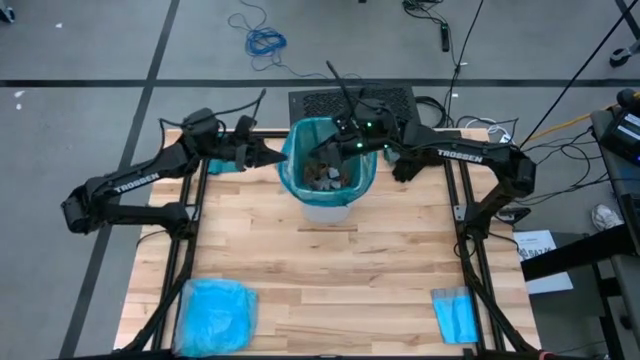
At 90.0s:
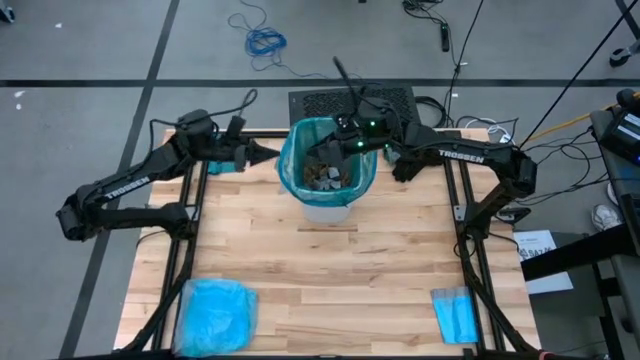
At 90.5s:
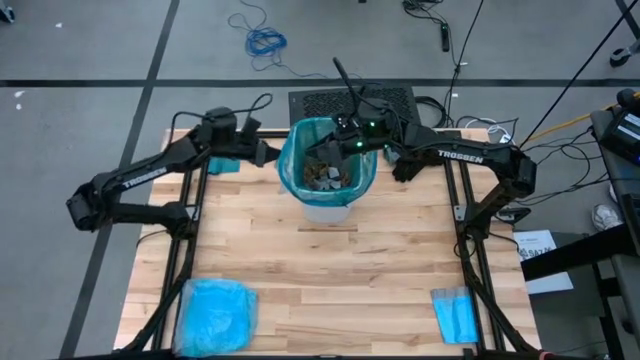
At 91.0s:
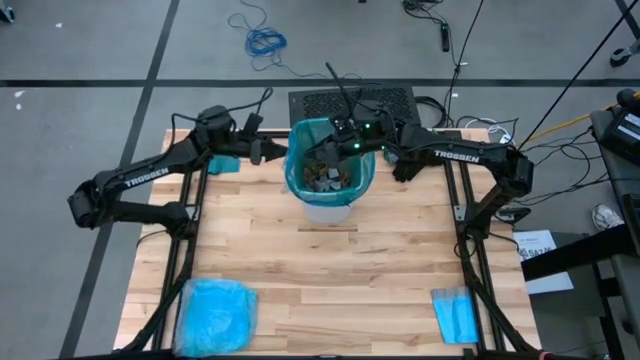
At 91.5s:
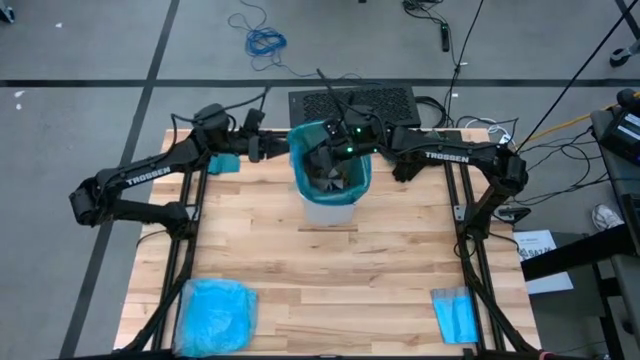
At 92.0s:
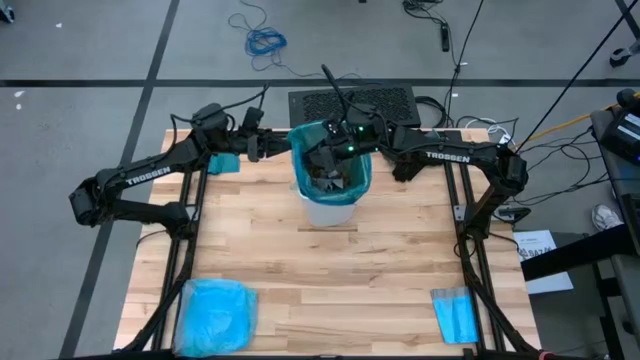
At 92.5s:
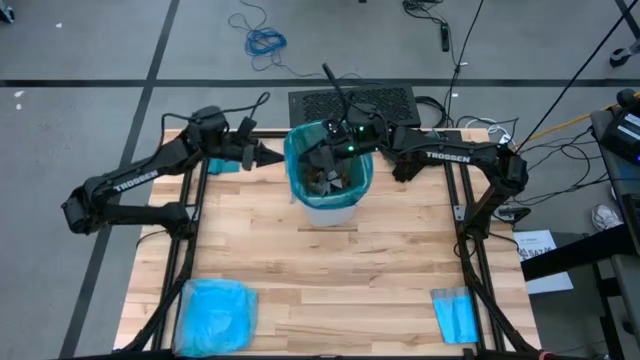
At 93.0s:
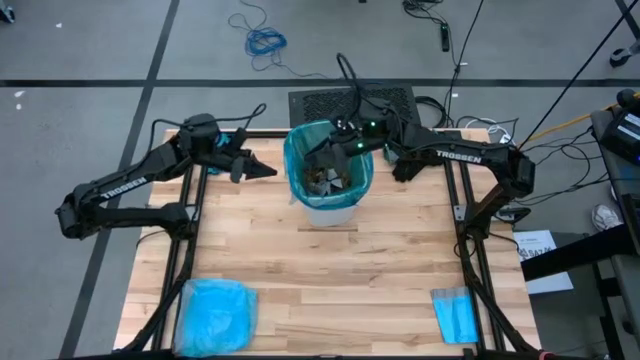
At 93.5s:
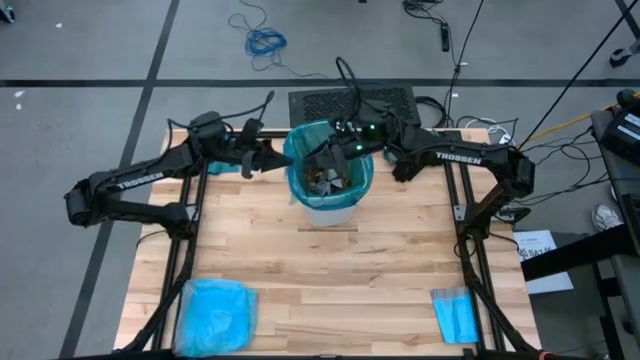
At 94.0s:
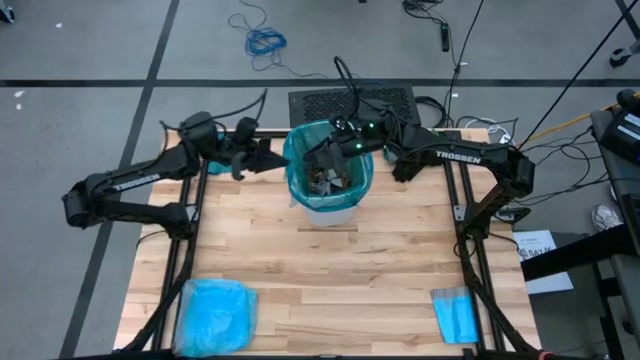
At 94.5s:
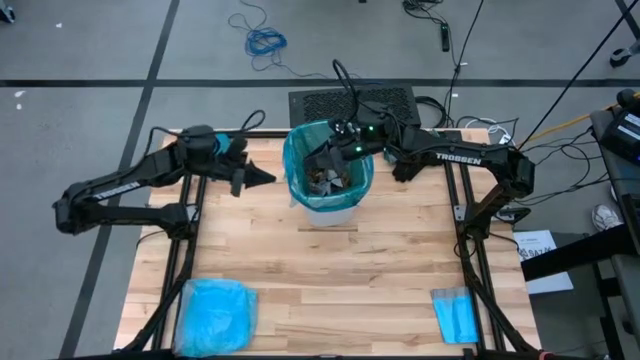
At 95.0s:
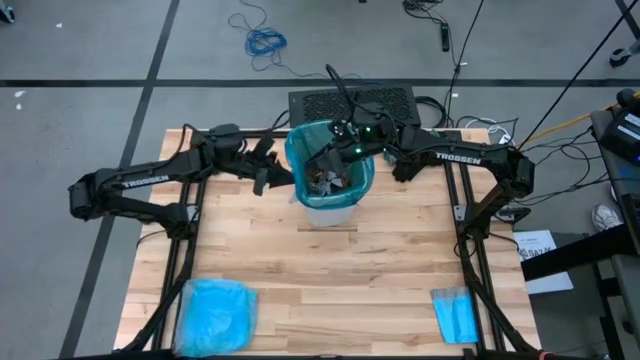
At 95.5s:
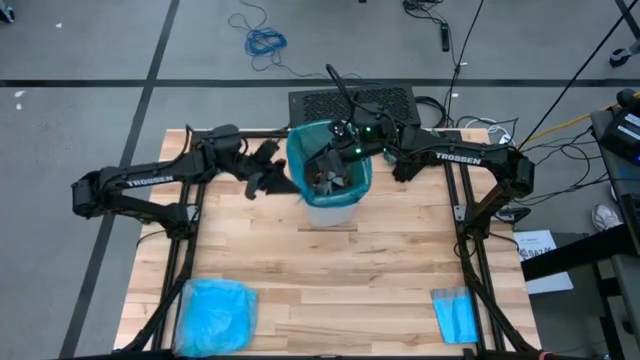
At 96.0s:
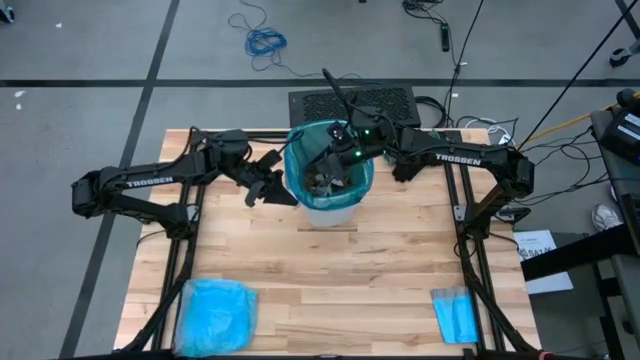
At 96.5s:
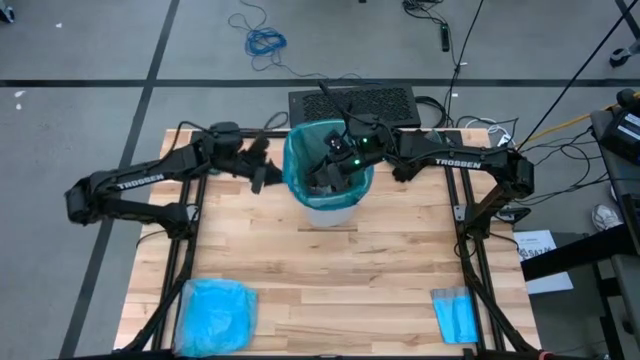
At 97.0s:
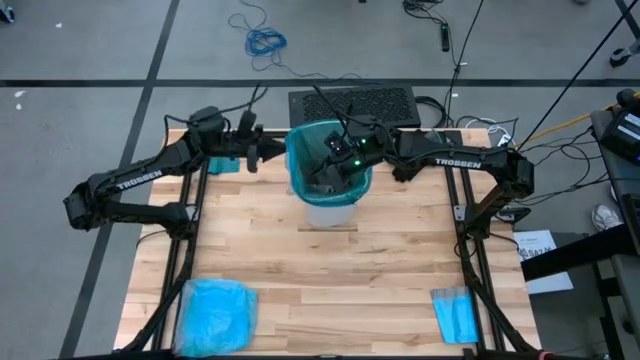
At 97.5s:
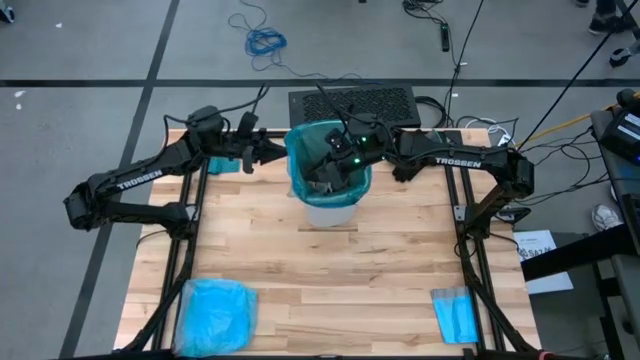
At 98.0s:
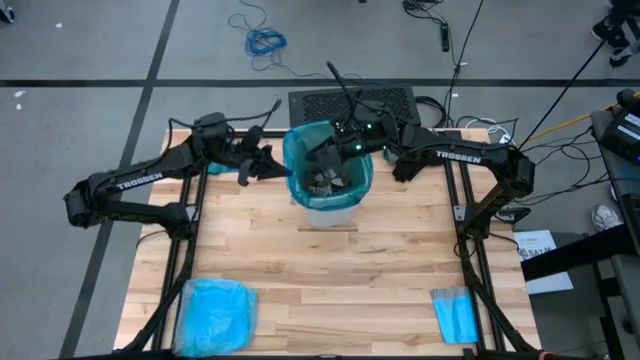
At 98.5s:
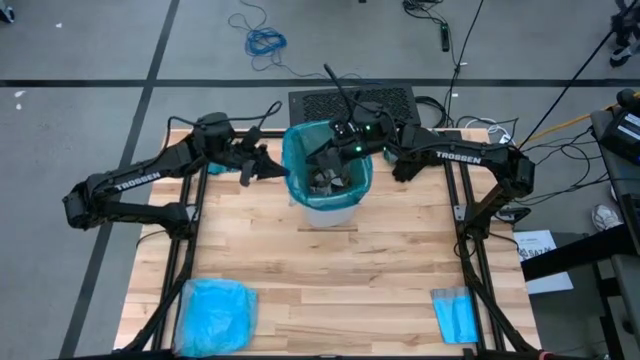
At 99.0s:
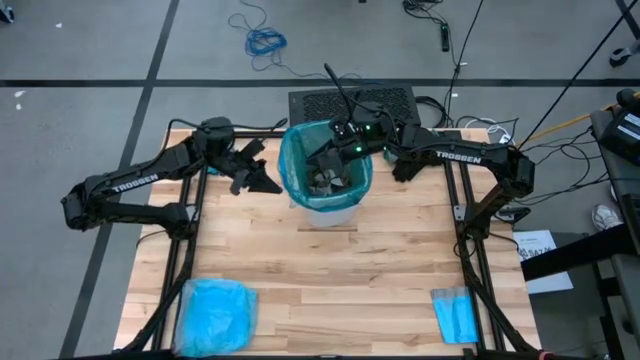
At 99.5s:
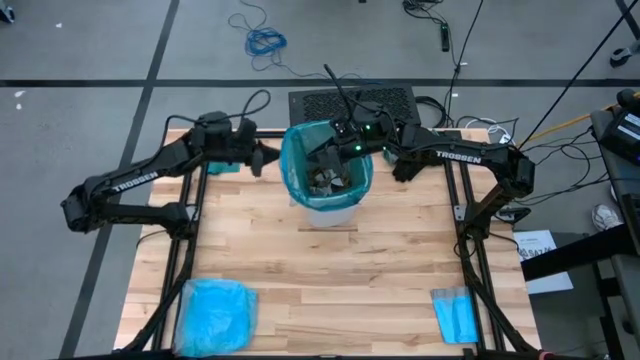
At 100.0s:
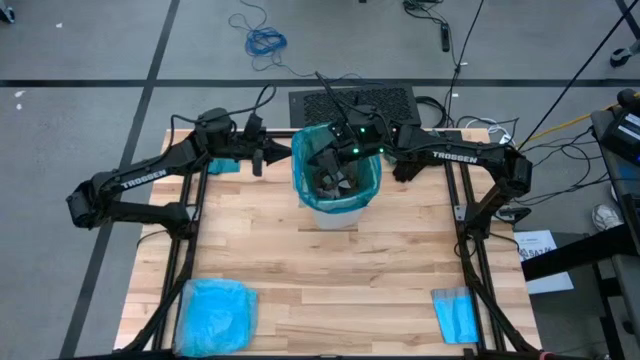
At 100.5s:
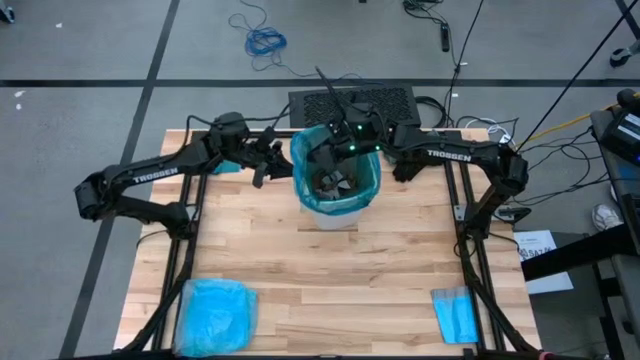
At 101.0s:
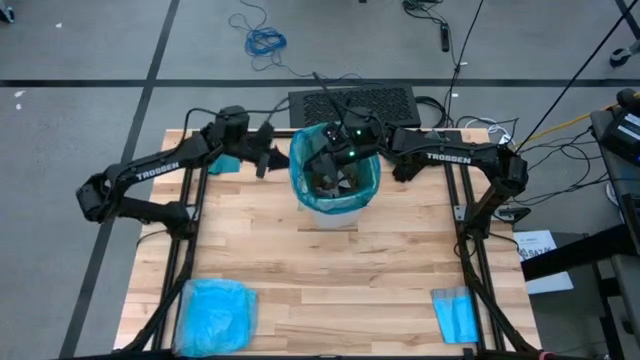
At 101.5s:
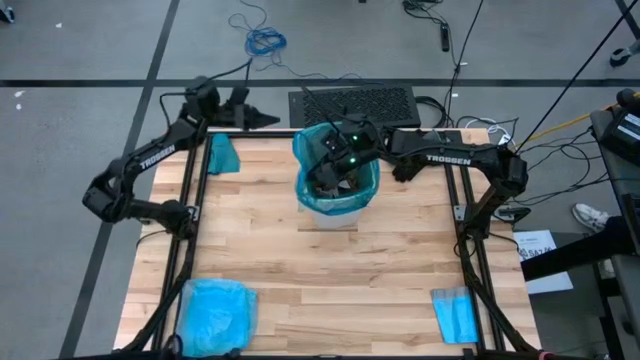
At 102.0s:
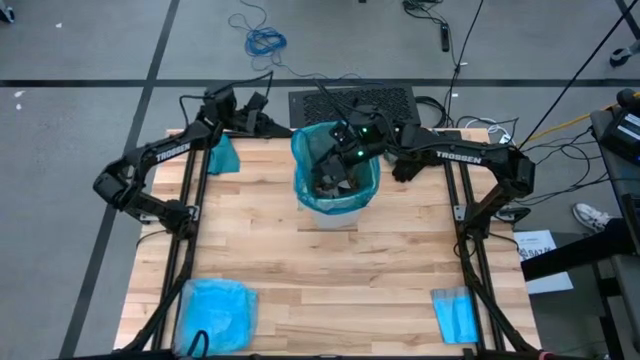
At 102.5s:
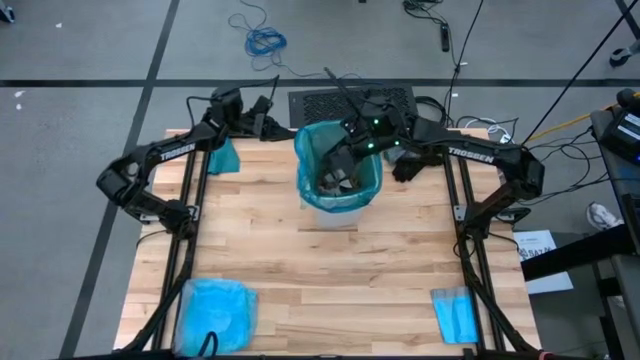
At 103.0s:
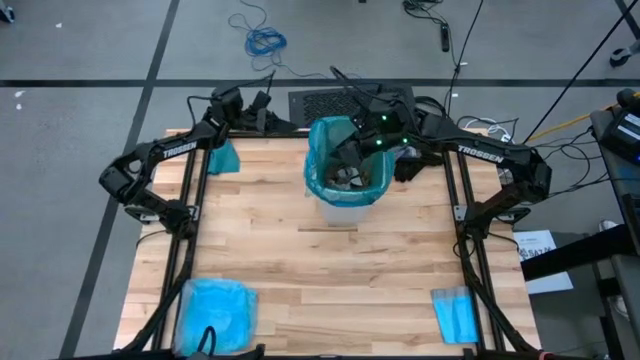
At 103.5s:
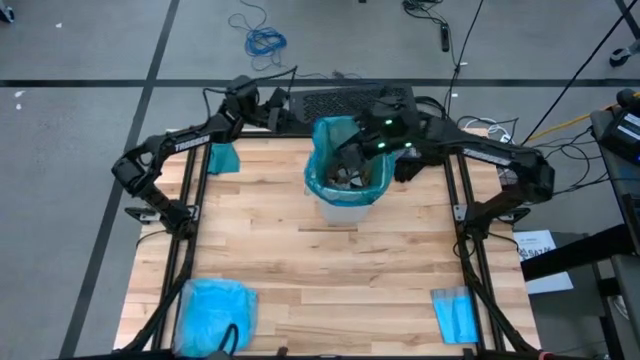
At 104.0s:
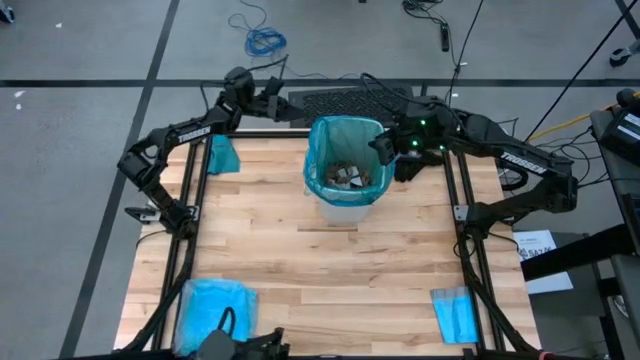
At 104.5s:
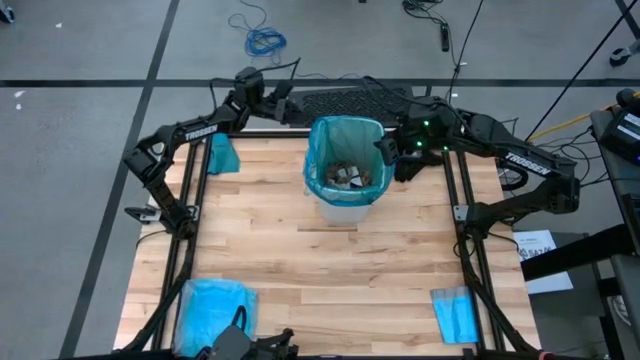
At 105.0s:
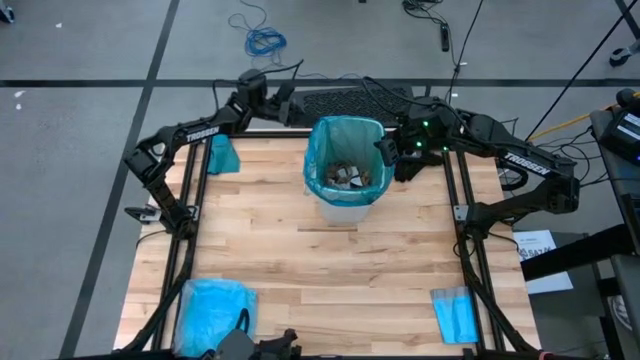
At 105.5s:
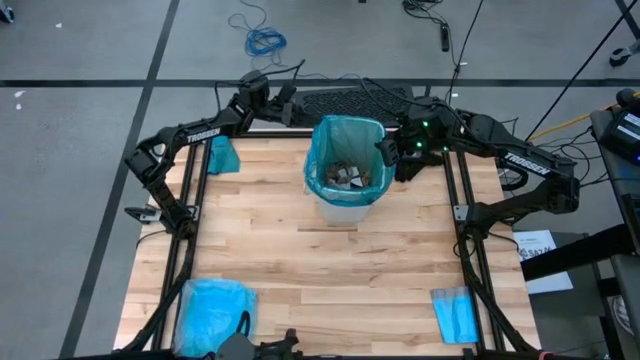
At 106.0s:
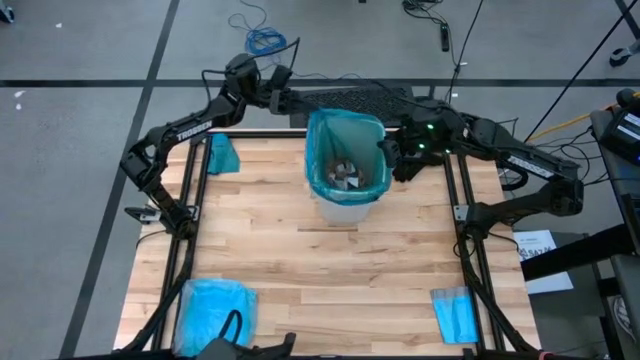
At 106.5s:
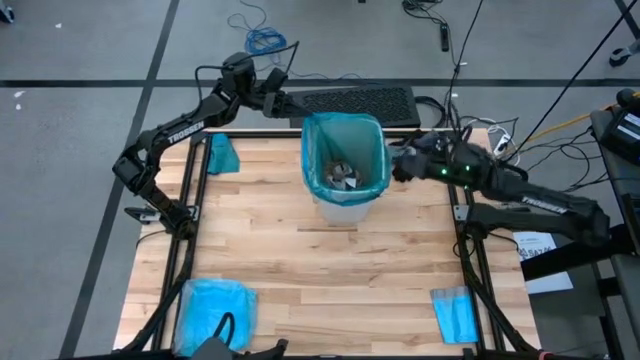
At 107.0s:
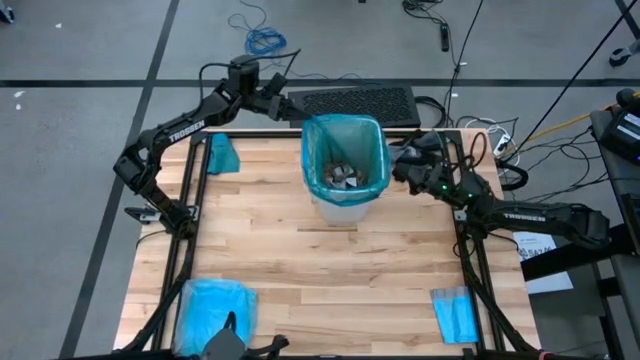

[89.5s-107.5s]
Task: place trash/remove bag and relplace
Remove the blue trash bag from the trash bin
